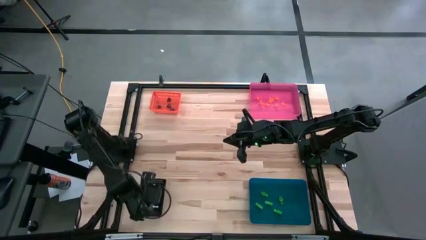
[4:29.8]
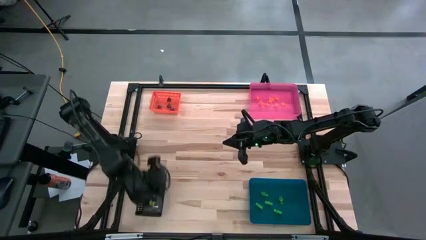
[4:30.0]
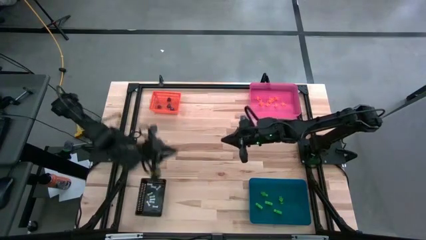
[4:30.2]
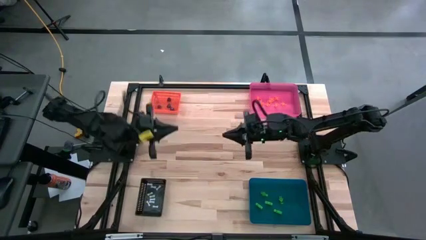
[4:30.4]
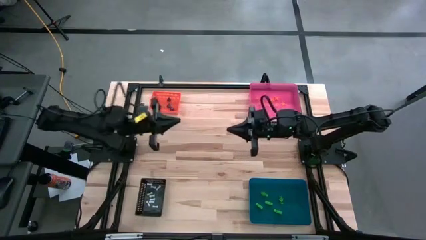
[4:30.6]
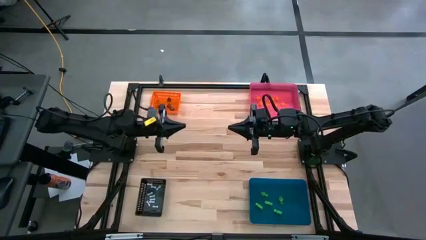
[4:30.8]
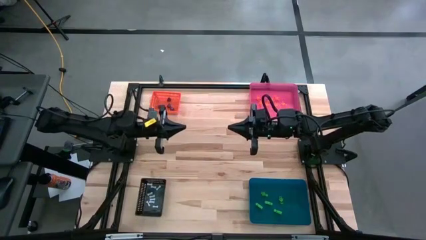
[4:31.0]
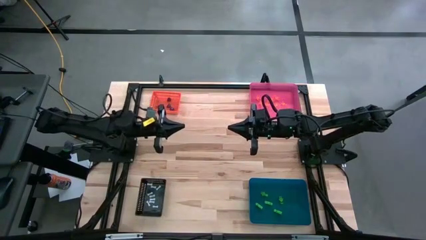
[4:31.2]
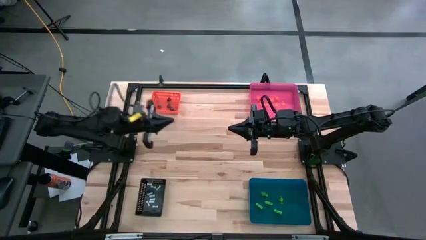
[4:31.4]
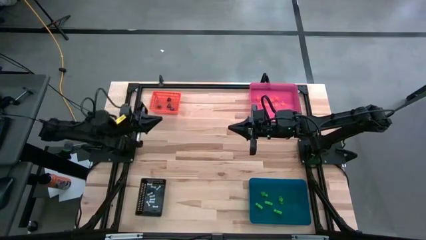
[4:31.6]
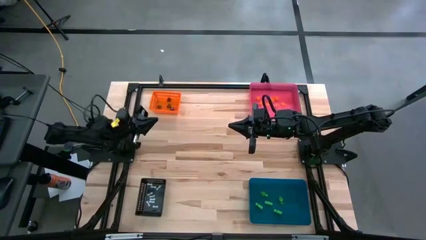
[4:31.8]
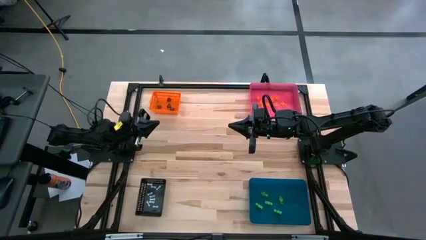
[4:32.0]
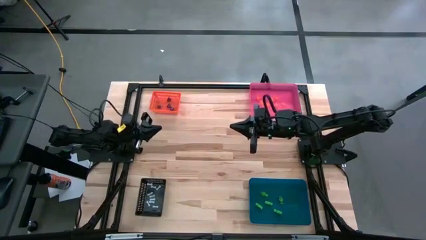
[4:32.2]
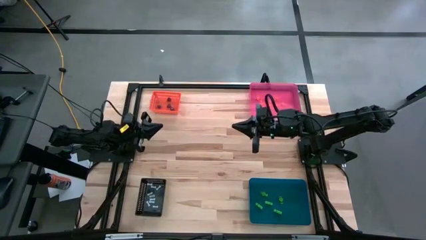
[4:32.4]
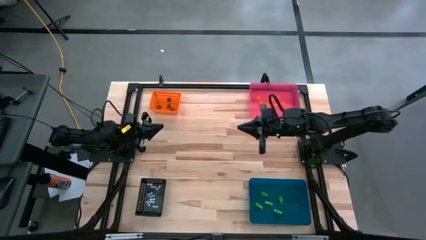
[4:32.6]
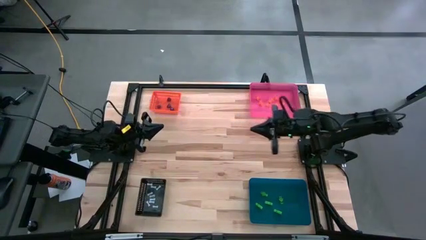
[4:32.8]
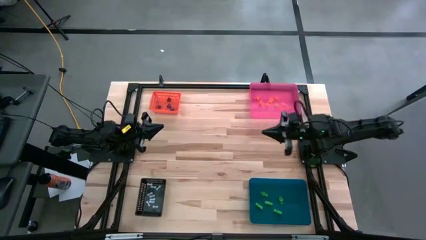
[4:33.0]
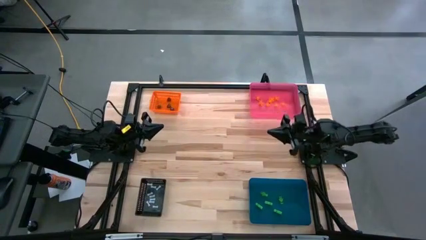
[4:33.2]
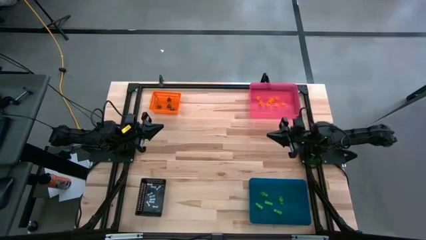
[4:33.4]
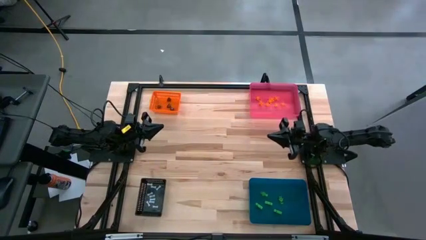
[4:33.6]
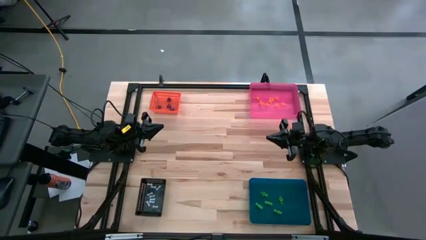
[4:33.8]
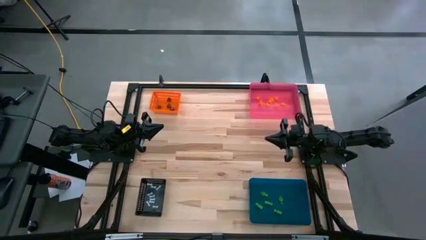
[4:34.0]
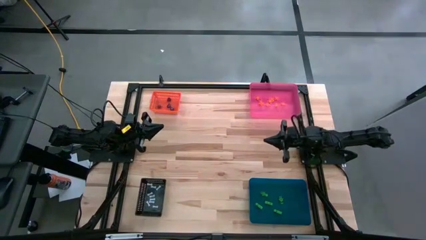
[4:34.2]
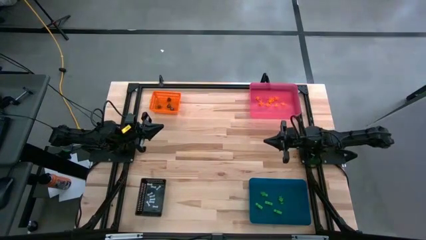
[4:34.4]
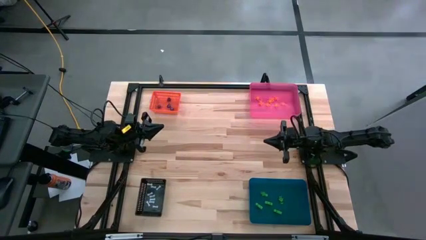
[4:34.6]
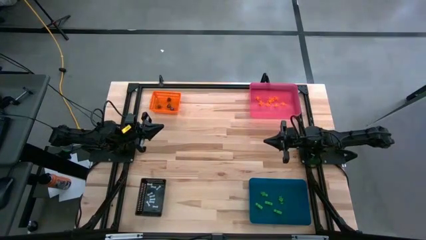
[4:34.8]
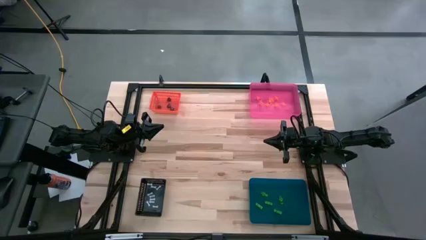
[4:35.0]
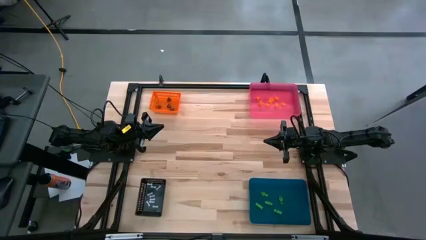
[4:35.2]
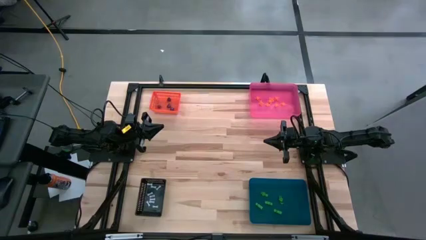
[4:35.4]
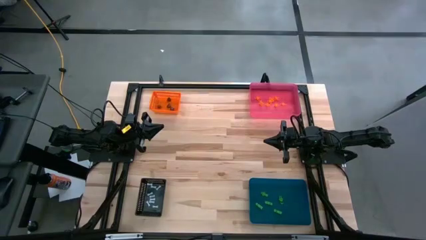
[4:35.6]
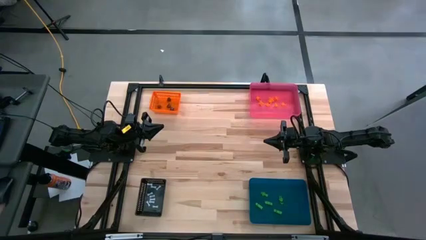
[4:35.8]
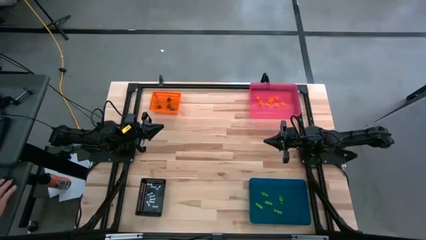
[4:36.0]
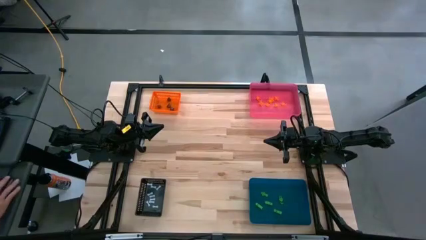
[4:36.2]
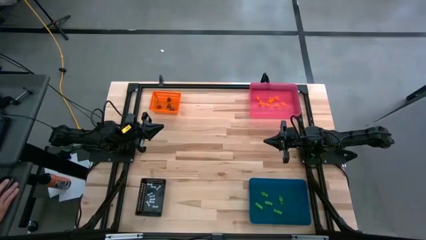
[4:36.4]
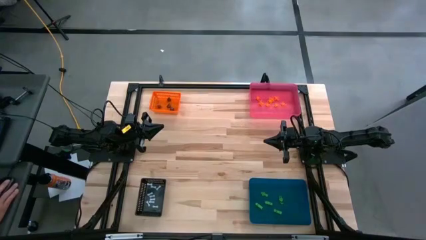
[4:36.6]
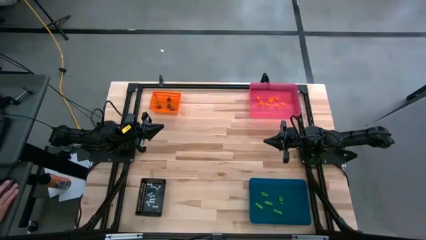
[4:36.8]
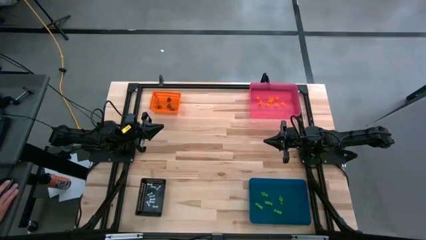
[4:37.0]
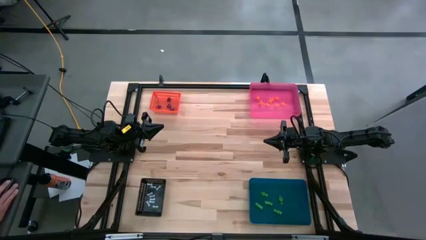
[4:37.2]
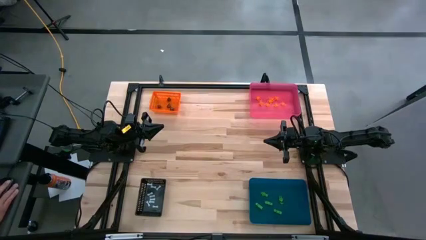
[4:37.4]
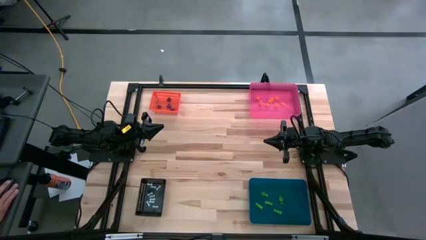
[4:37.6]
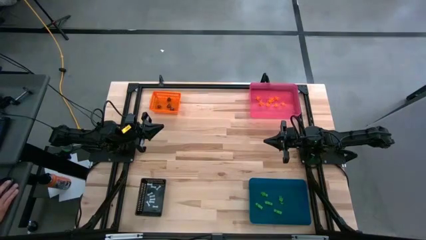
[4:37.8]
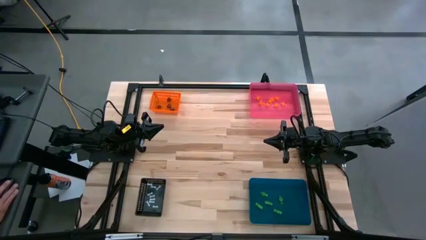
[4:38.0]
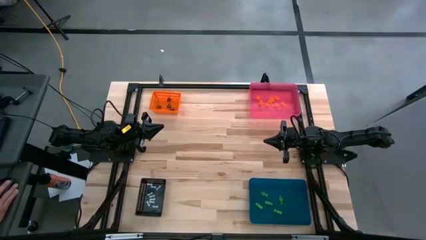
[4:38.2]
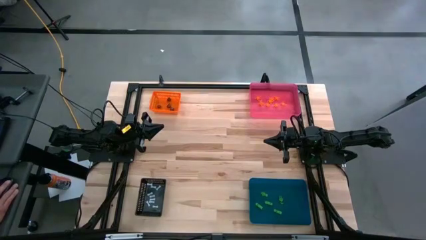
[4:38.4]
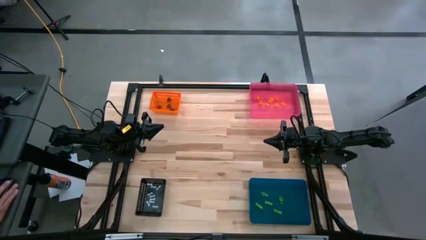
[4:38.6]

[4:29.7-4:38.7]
Task: Sort Halloween decoration
Return to Home Position

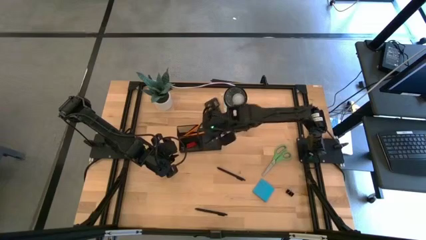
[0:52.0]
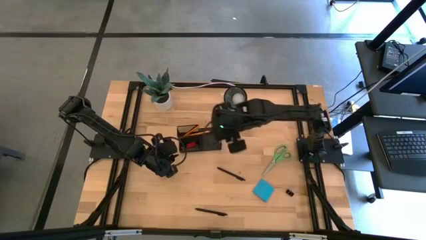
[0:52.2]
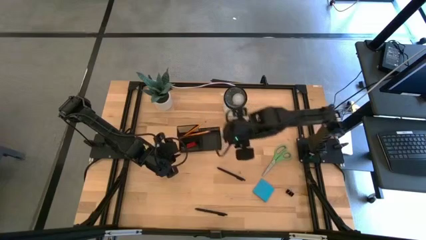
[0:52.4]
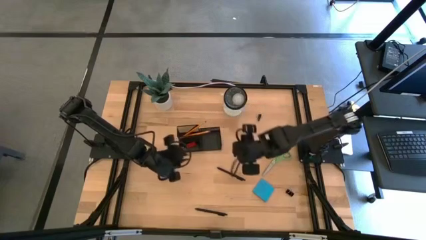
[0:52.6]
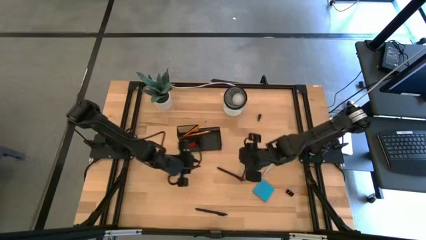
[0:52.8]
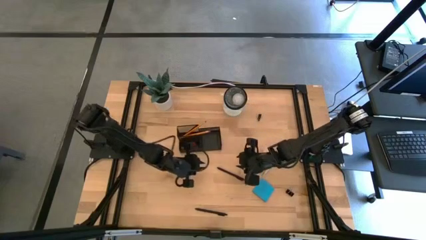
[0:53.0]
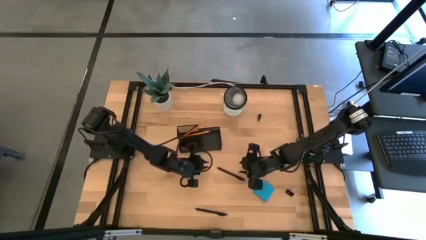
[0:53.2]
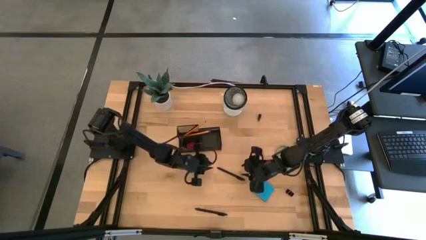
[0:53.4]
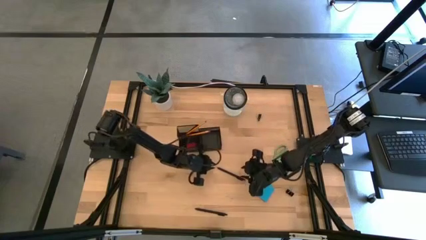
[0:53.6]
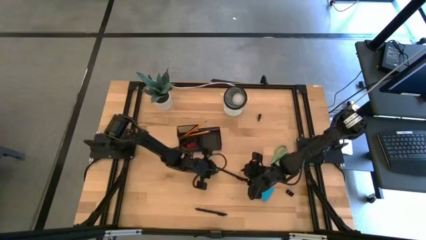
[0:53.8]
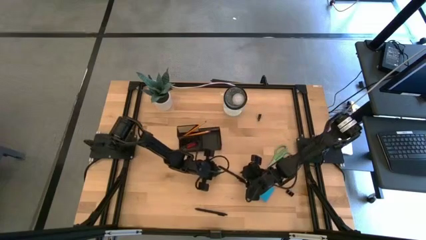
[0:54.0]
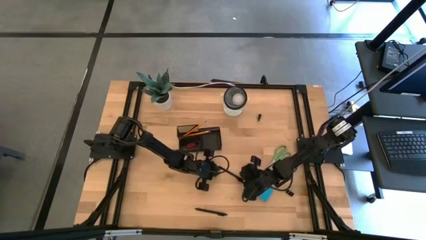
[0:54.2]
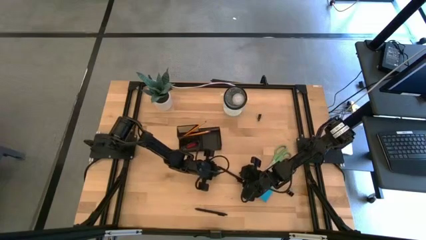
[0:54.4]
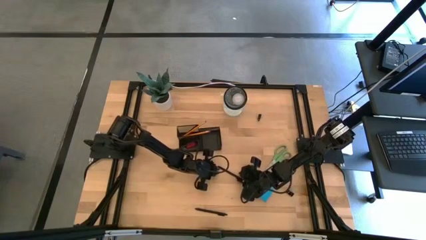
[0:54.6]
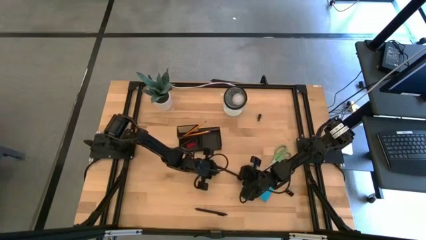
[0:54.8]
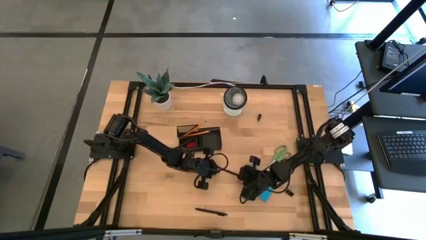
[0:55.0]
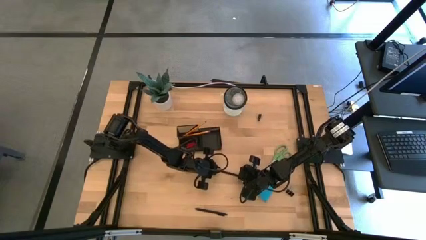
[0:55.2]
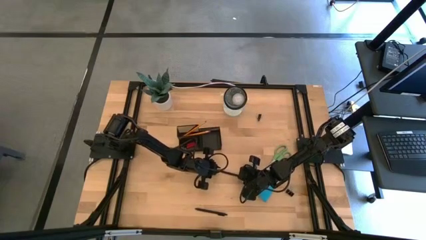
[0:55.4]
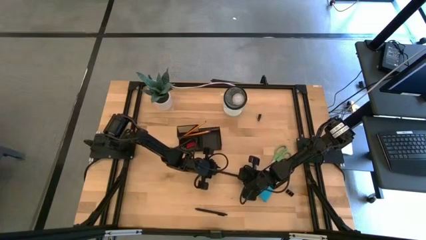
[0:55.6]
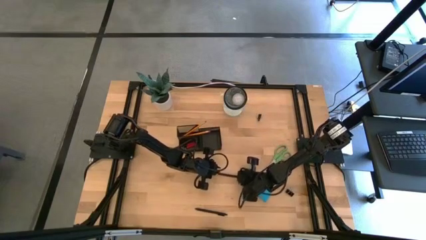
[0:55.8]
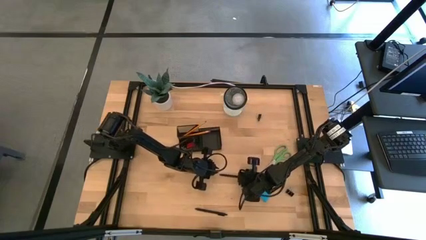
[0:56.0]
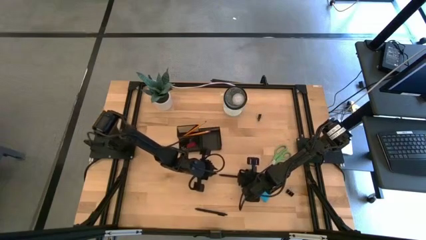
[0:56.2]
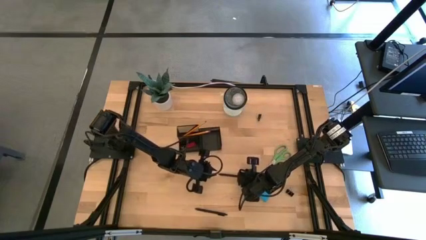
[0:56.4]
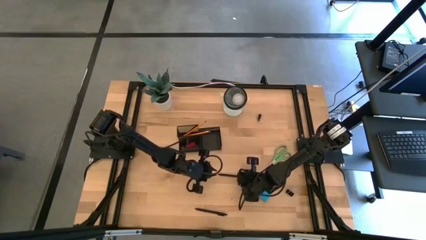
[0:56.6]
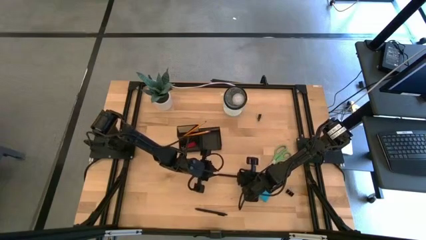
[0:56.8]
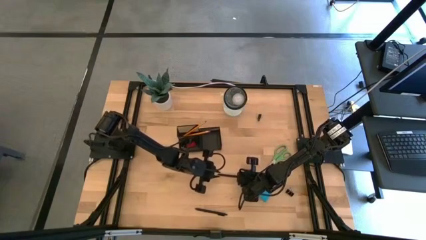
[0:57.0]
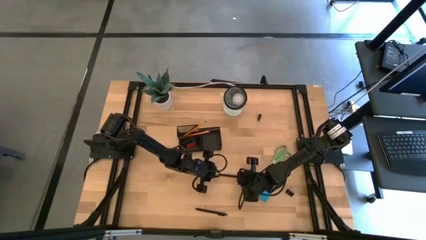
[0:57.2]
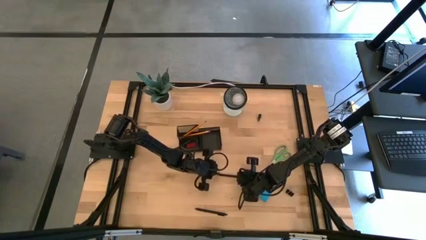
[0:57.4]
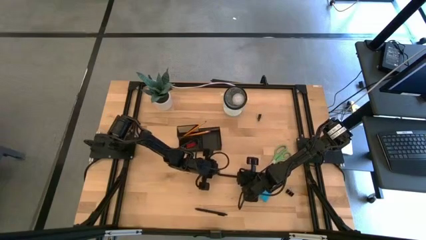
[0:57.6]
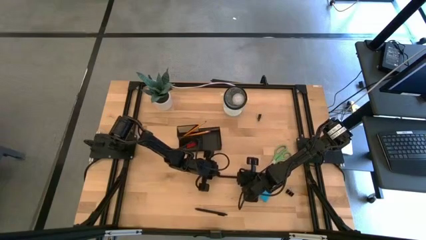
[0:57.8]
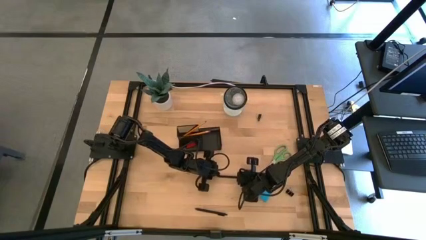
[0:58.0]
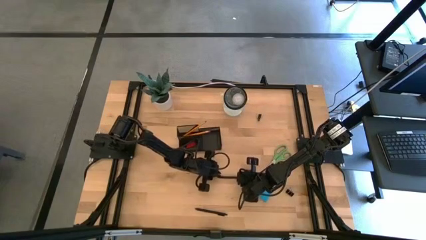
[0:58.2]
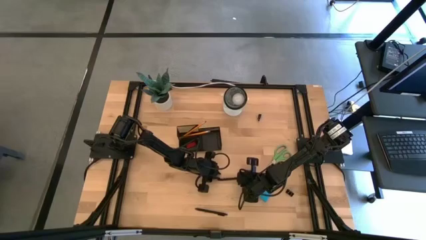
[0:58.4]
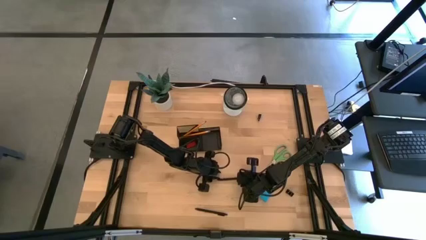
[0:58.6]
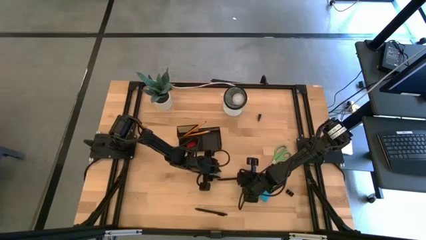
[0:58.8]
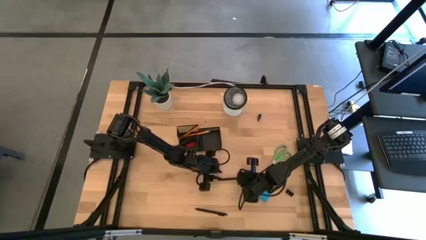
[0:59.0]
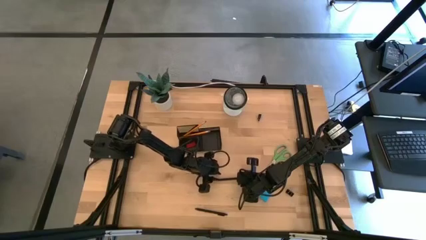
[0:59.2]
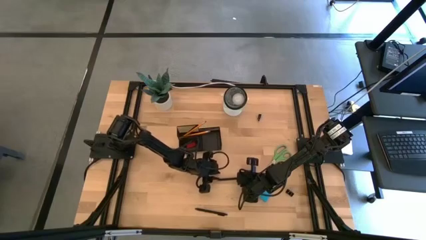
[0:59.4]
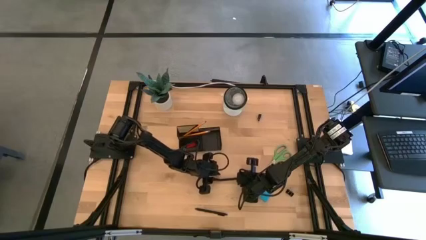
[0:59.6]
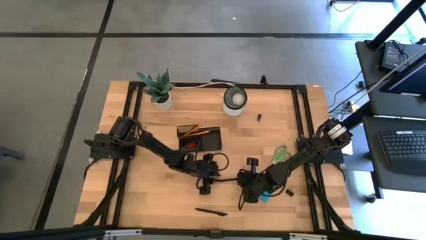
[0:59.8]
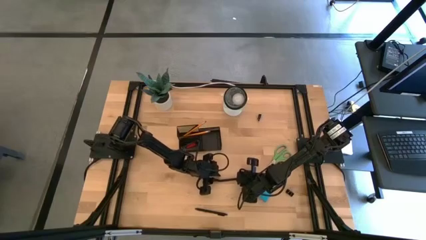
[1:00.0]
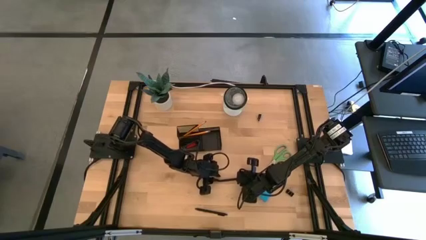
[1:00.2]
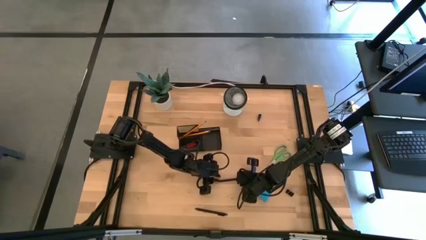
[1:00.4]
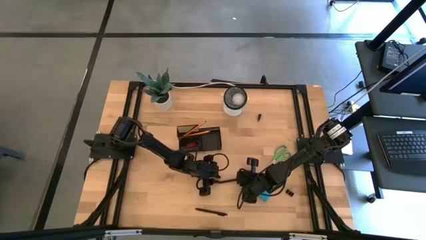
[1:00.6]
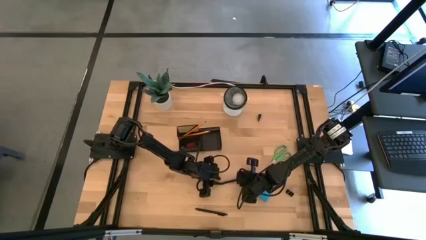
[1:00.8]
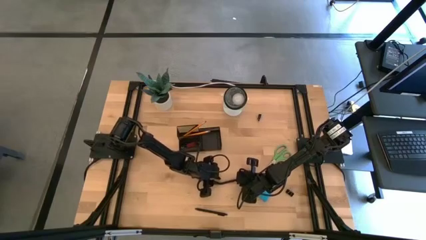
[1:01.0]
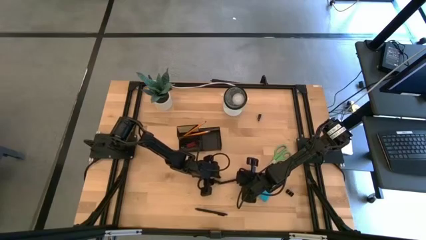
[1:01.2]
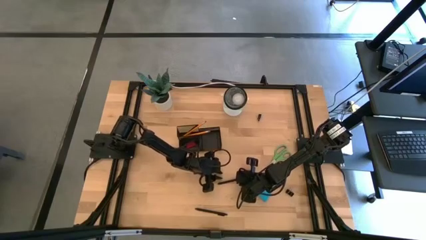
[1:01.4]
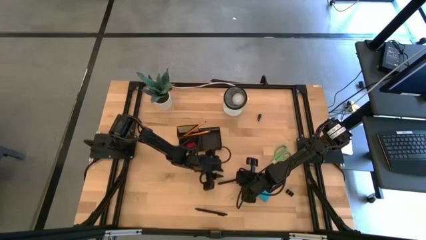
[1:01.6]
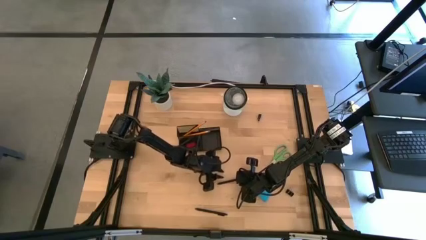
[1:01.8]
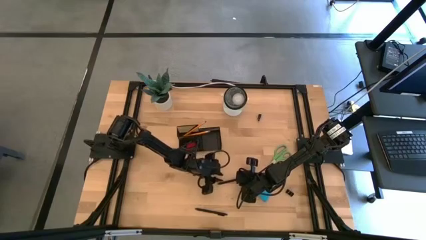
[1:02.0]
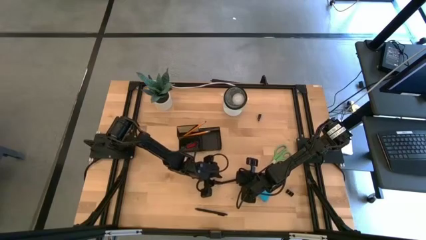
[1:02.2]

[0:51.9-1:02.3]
Task: Pick and place office supplies into organizer
Put the top right black pen in the desk organizer
